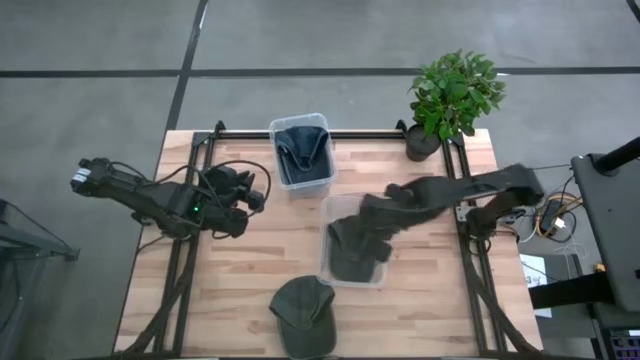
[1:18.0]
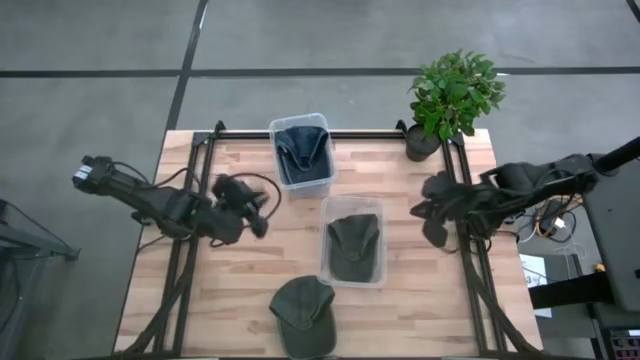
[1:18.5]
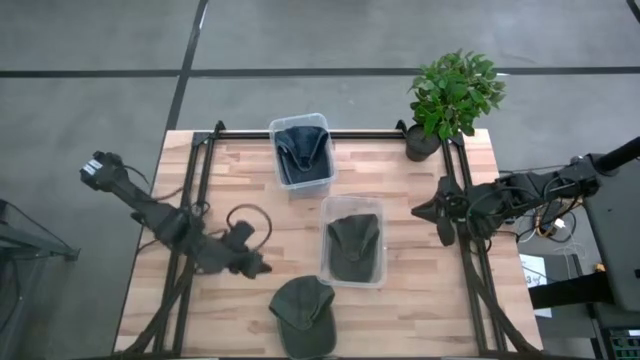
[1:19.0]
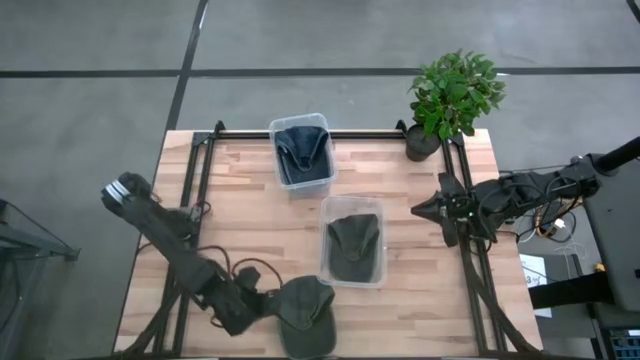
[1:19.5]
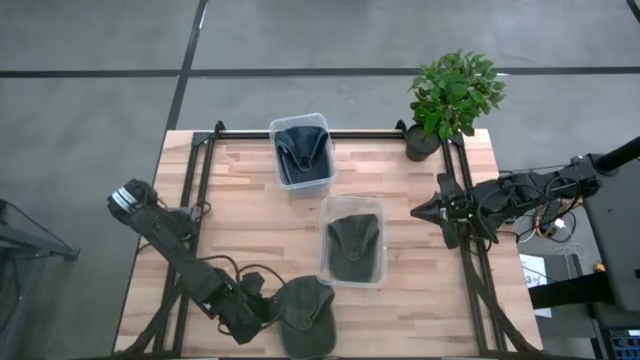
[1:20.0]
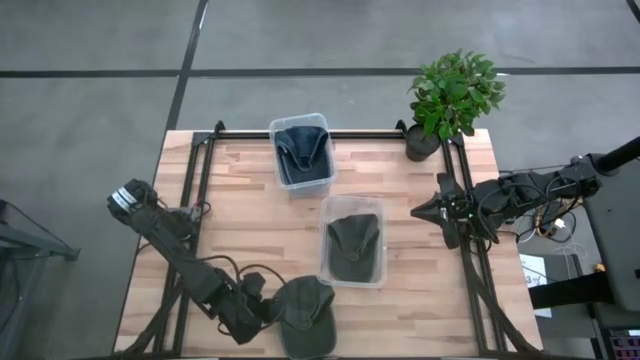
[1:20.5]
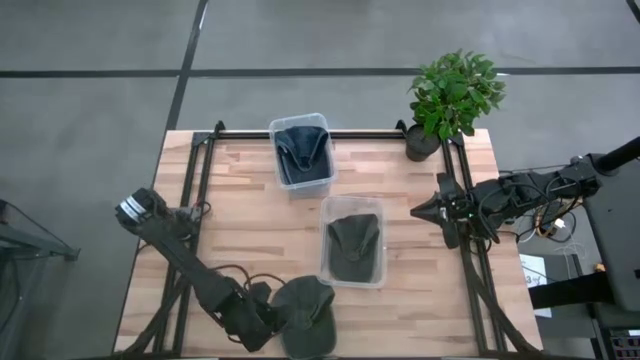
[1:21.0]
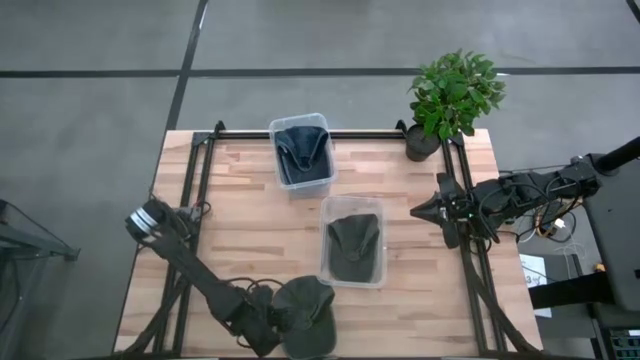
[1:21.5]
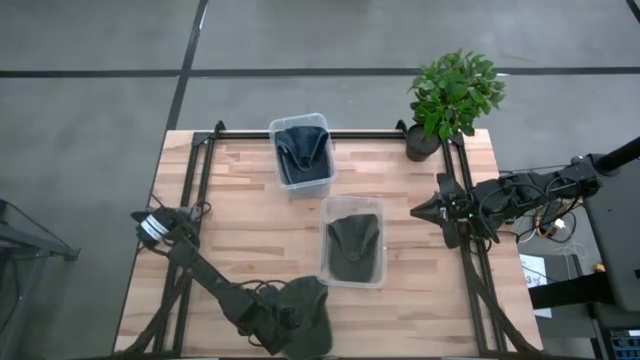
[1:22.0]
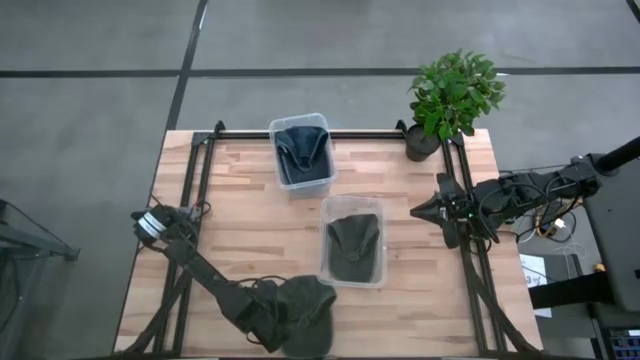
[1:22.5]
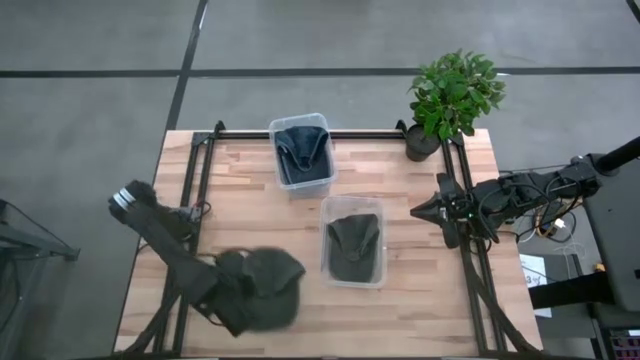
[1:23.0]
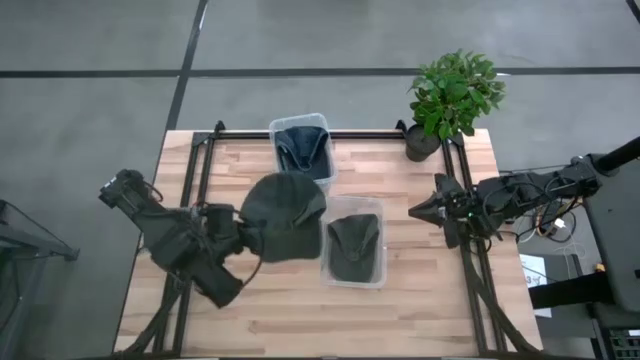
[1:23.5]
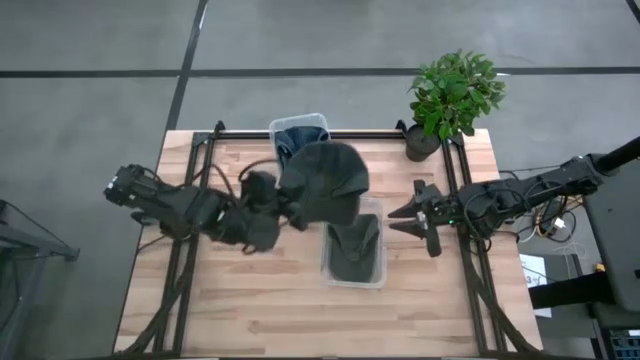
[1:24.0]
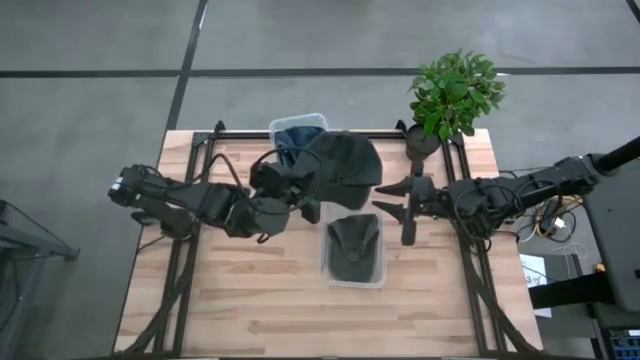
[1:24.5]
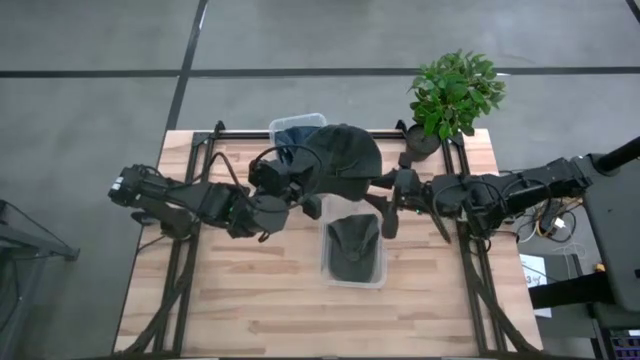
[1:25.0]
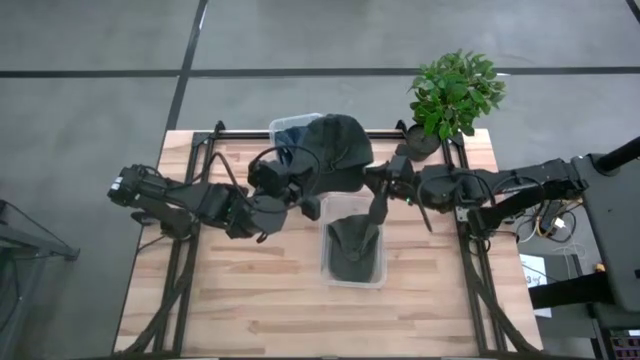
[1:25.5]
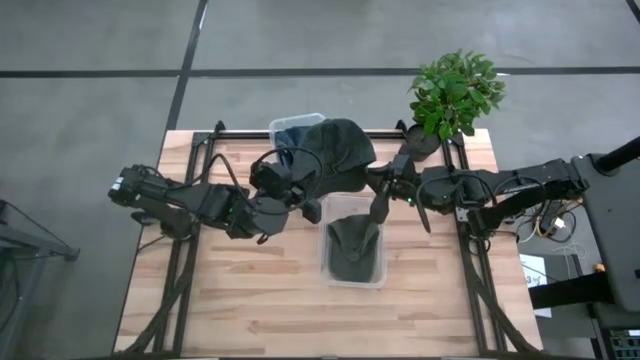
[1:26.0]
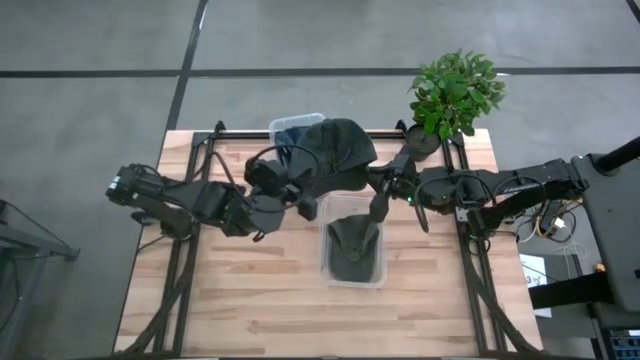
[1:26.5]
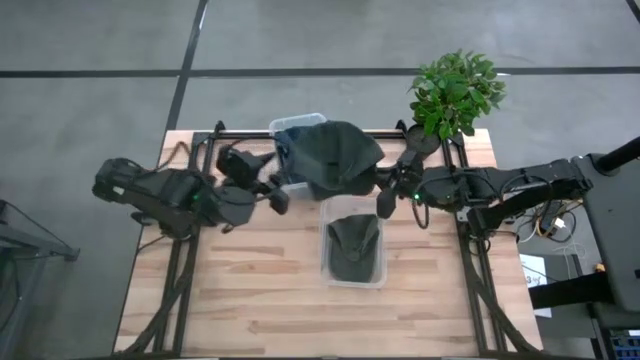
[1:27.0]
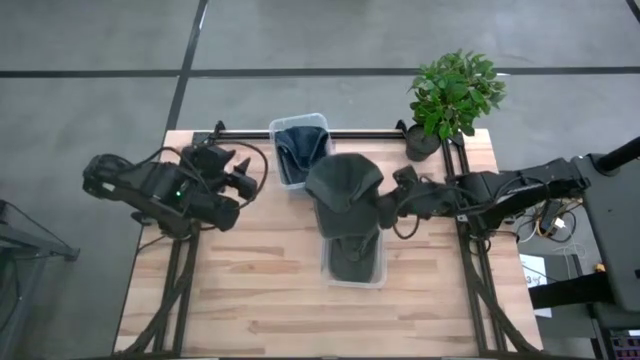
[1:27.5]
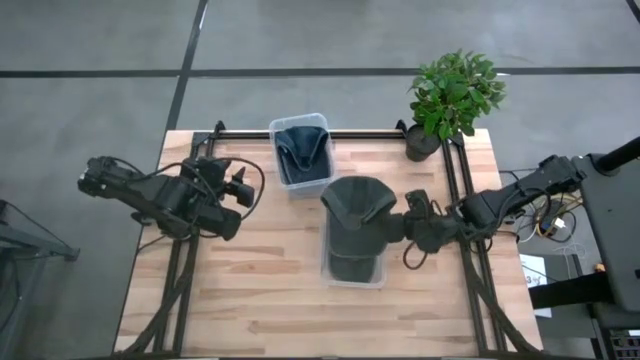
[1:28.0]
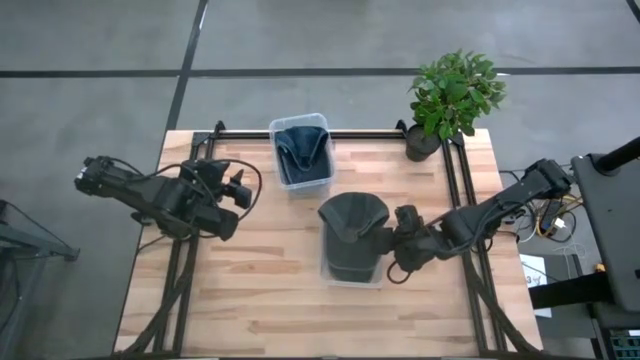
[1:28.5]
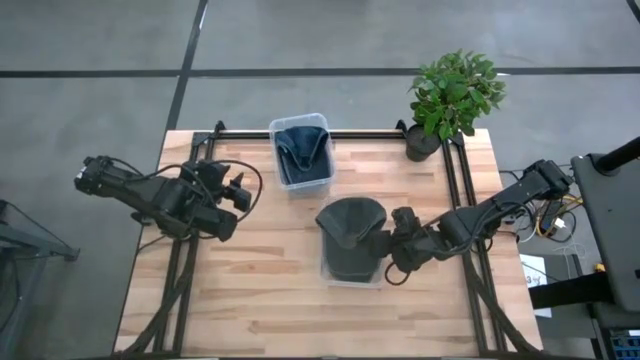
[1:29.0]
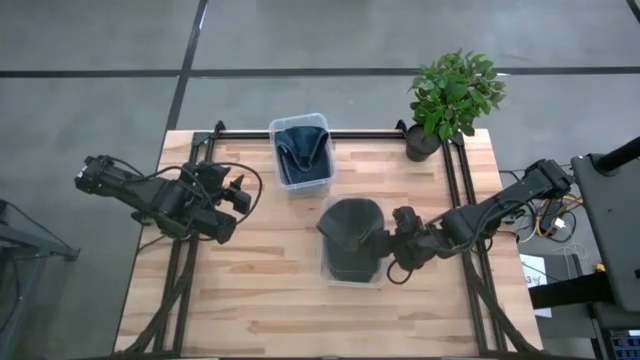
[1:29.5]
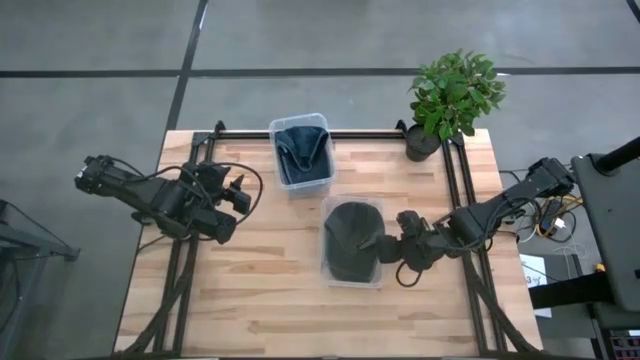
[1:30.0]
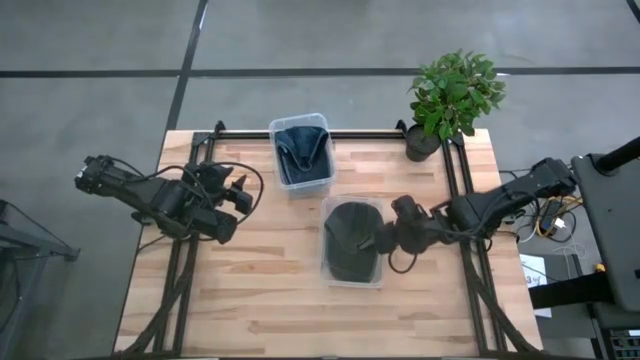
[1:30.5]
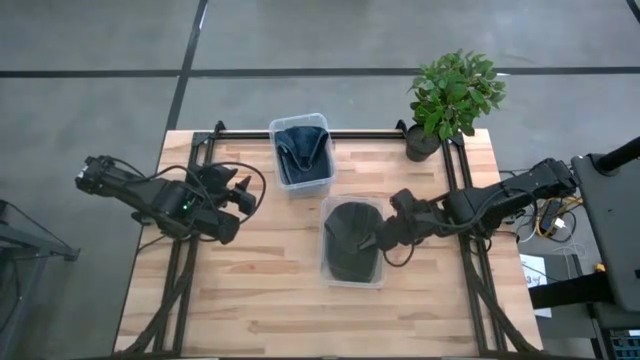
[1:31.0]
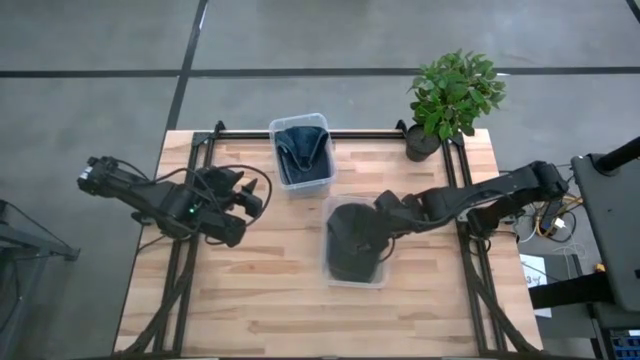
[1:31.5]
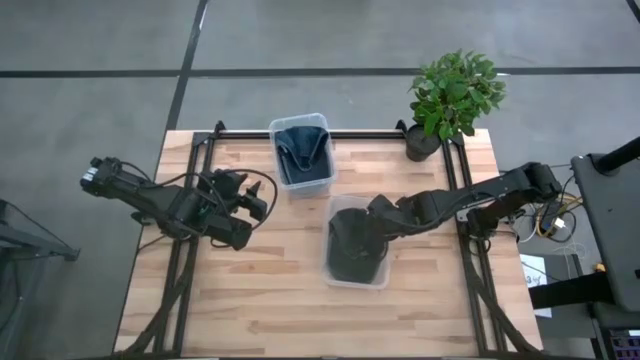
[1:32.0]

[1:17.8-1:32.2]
Task: Pick & Place hat
Put the black cap into the bottom transparent bin

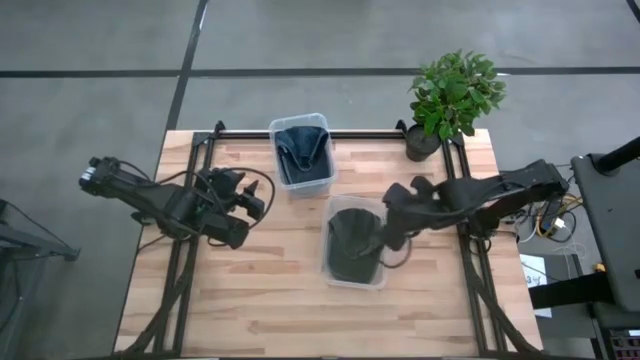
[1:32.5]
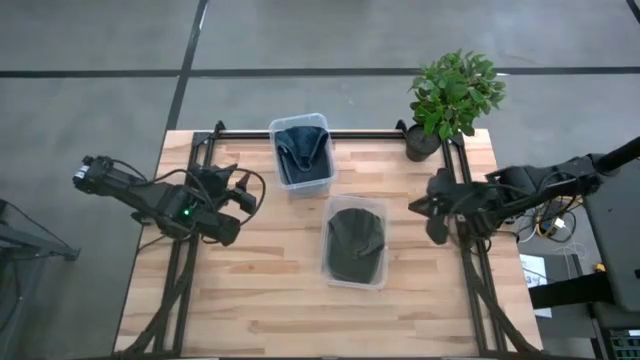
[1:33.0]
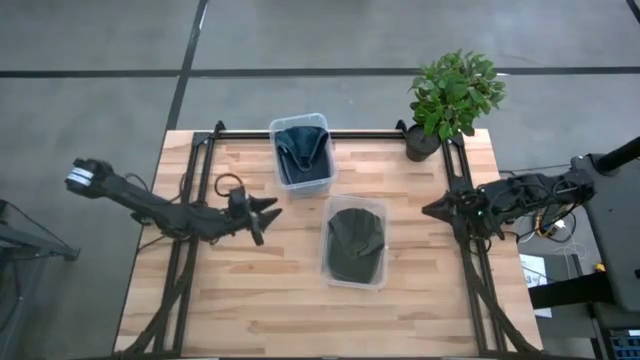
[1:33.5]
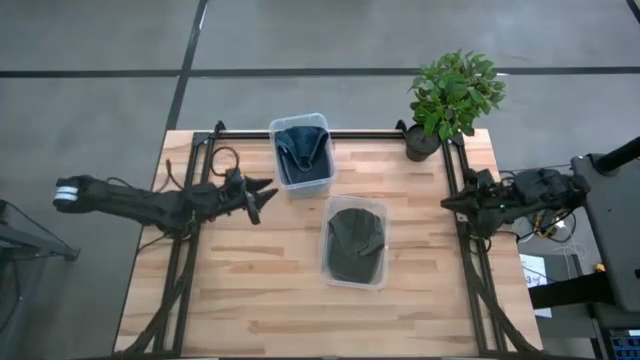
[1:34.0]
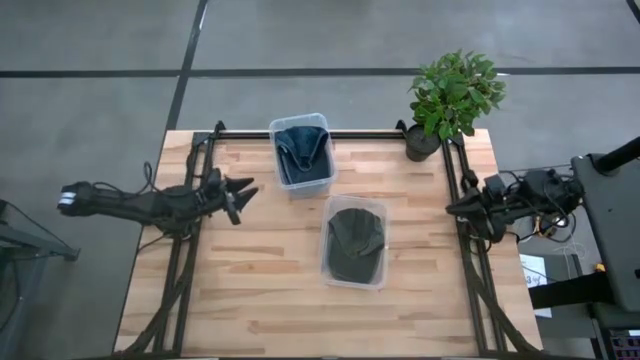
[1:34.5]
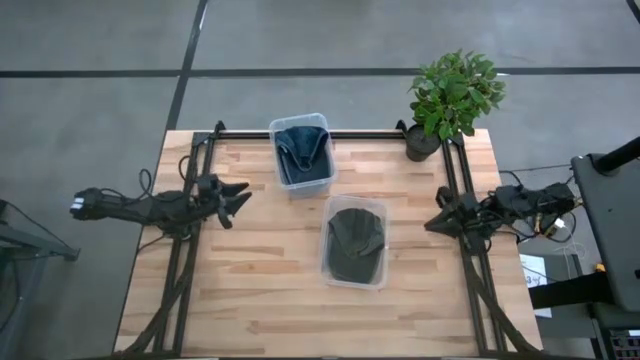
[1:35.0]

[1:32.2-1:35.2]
Return to Home Position

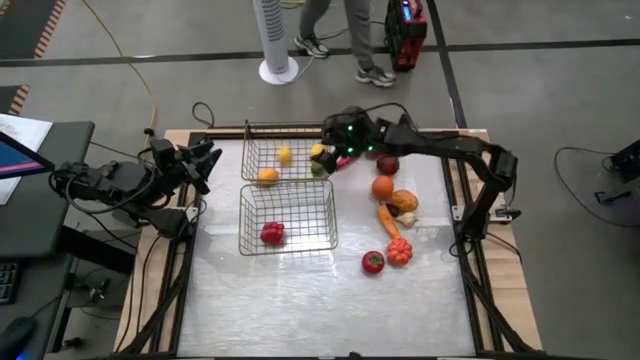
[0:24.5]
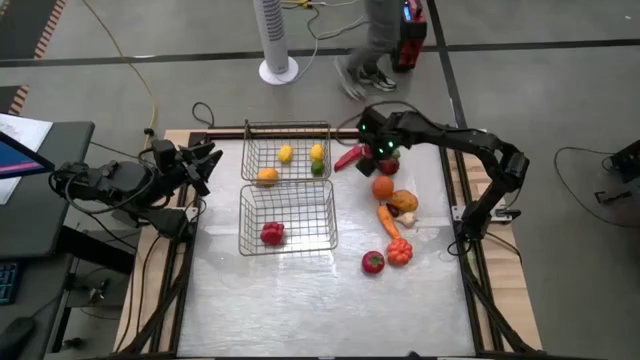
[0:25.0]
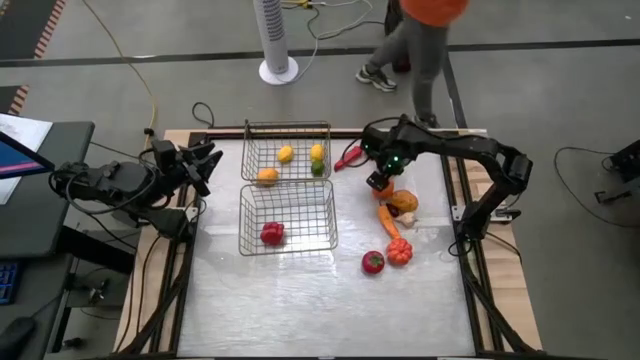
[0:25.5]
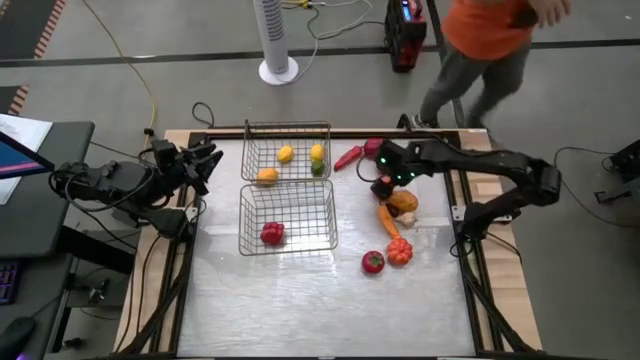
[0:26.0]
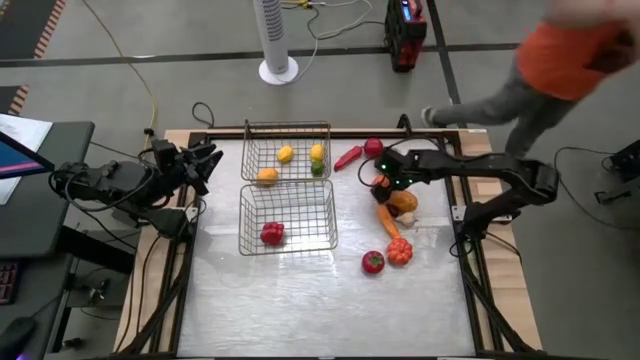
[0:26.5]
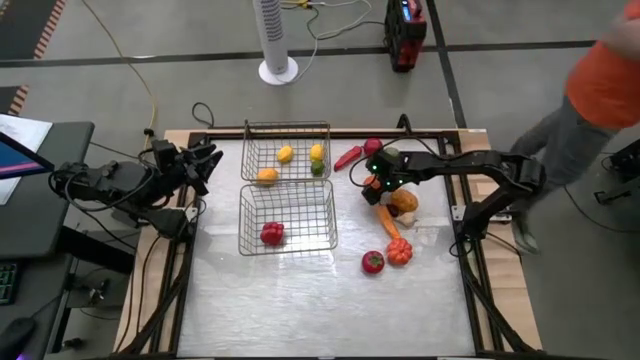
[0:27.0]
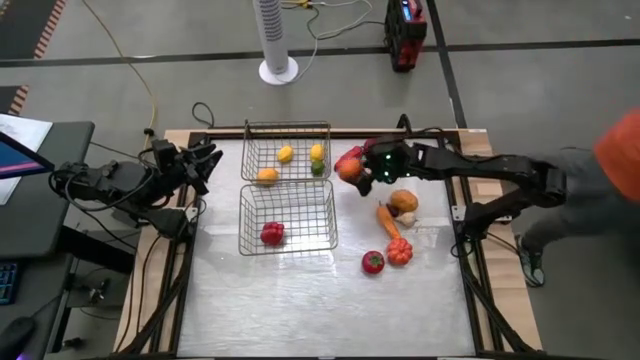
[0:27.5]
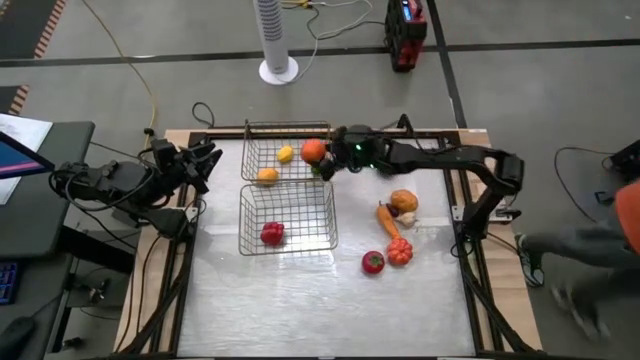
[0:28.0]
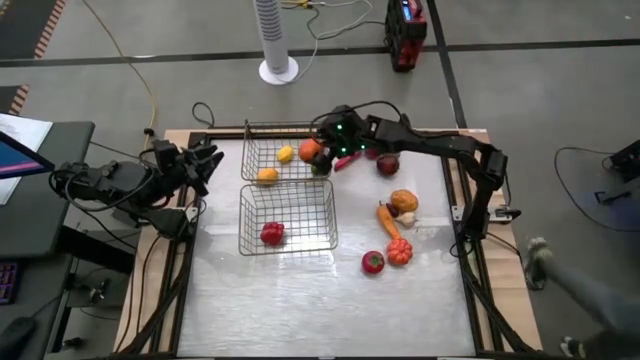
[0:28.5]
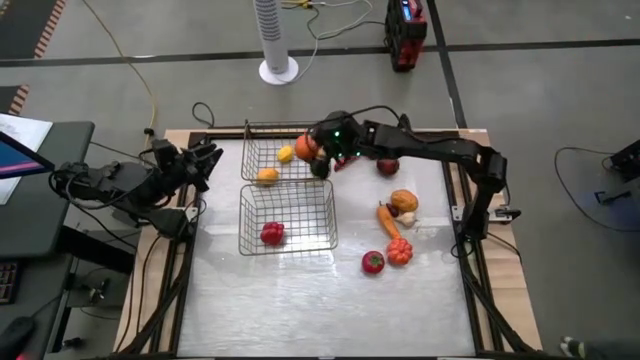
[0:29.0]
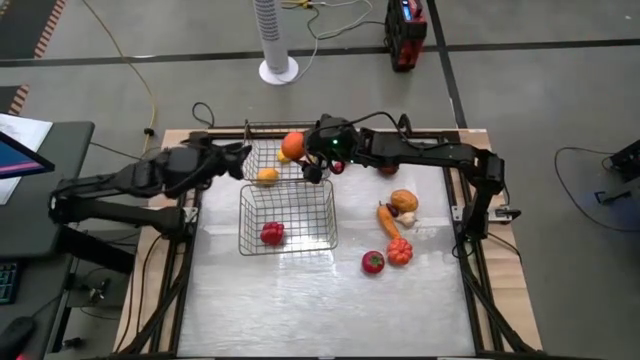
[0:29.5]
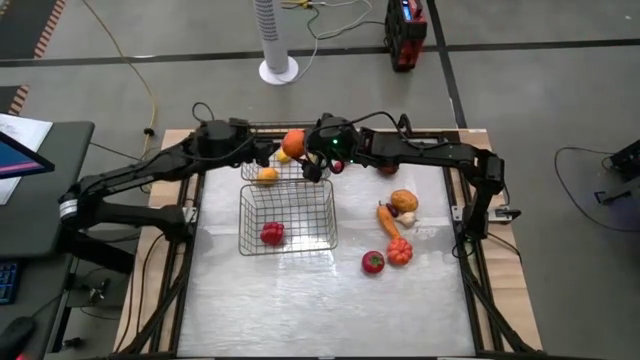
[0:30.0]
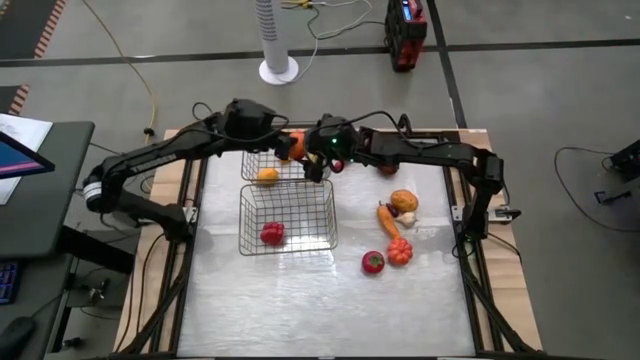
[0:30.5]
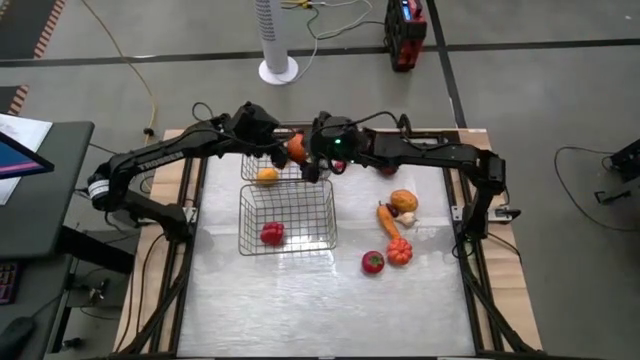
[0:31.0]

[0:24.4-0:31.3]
Task: Sort produce into baskets
Put the orange into the top mesh basket
